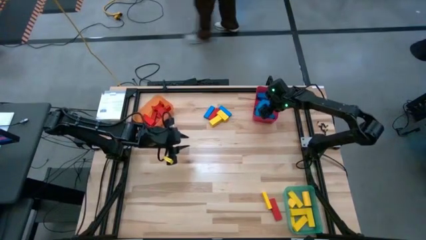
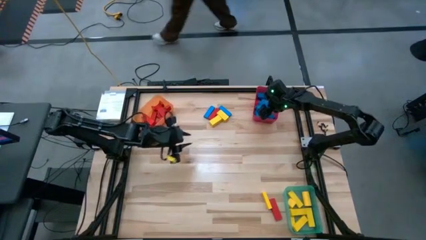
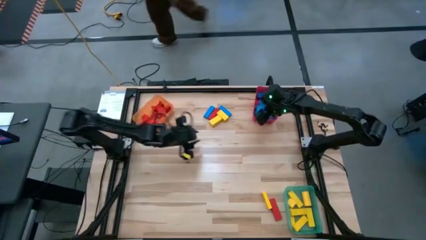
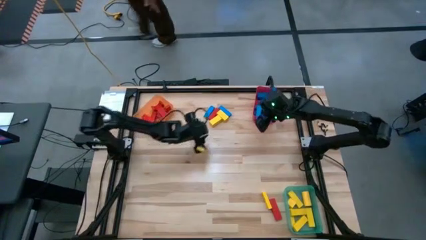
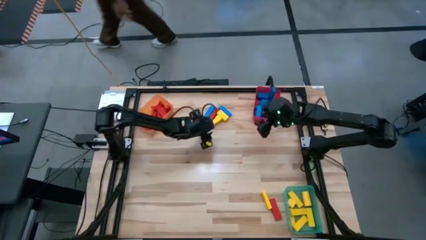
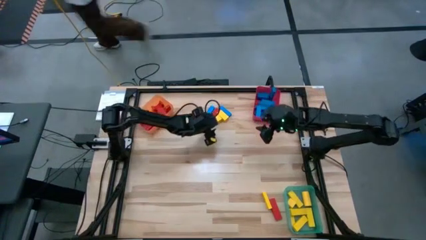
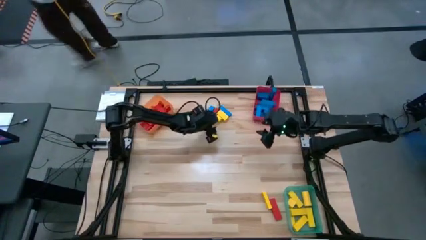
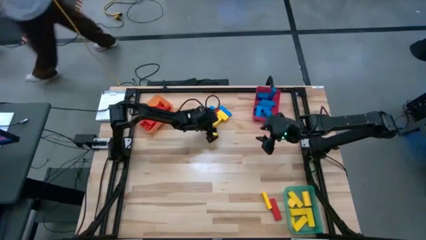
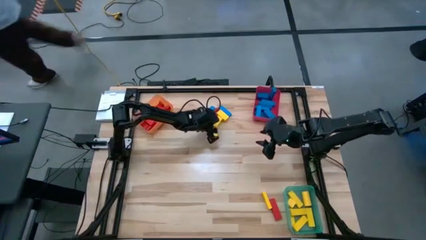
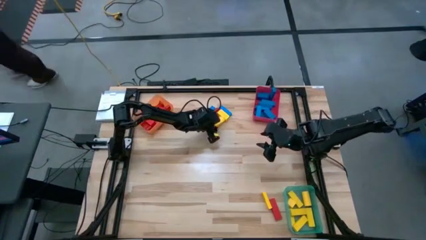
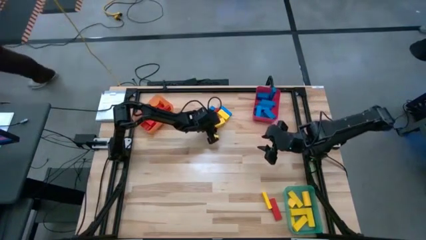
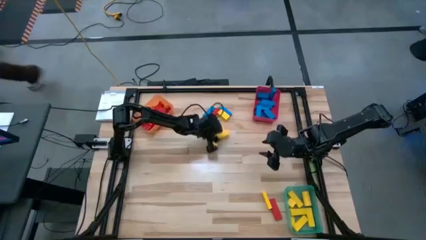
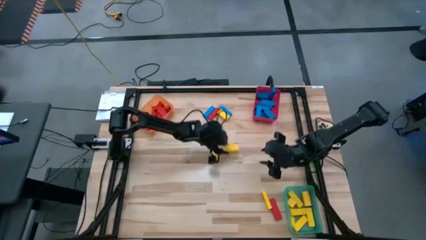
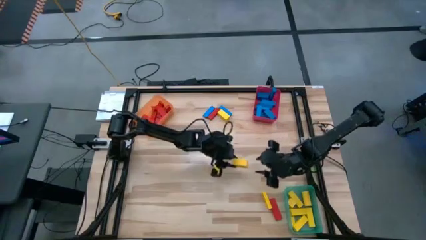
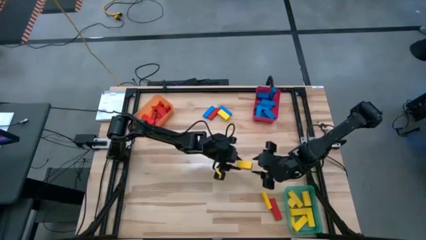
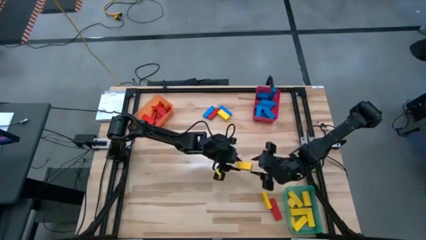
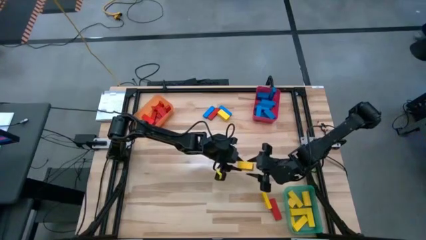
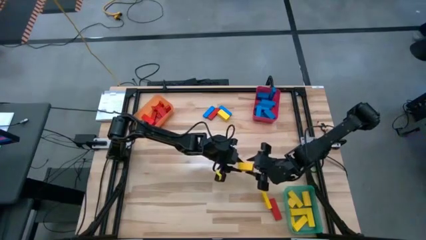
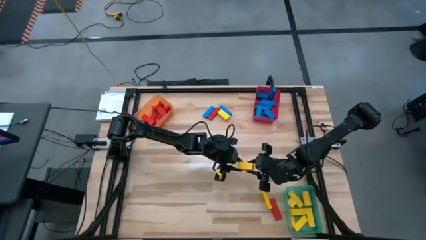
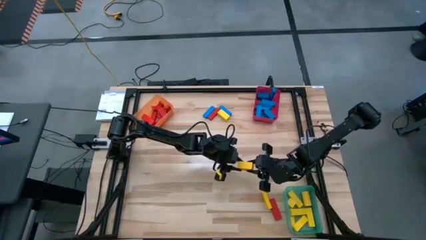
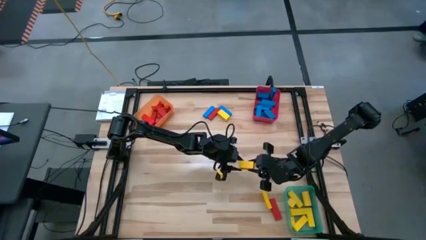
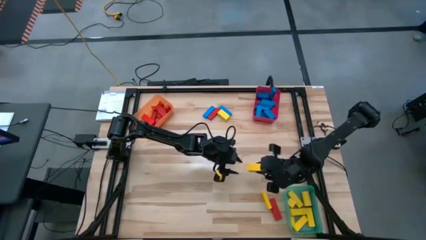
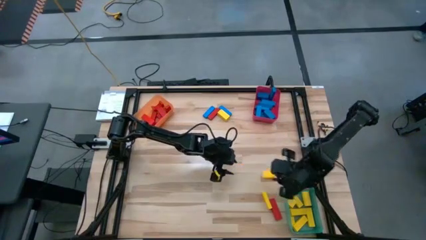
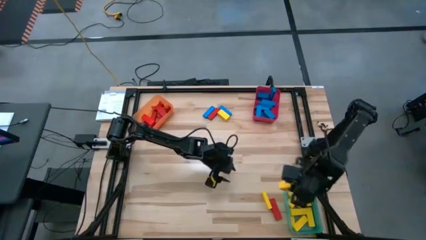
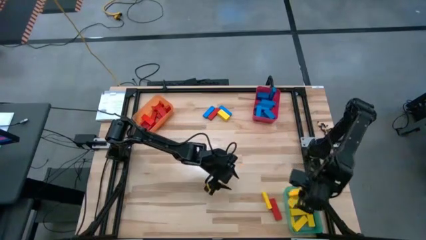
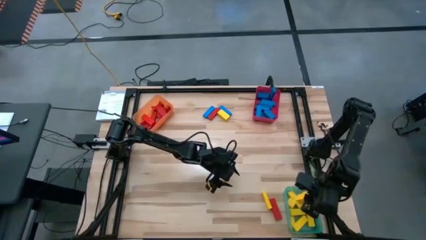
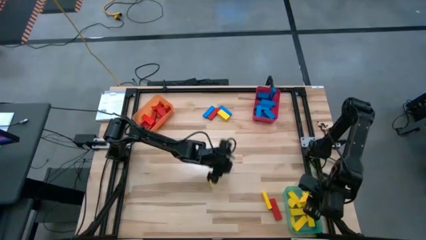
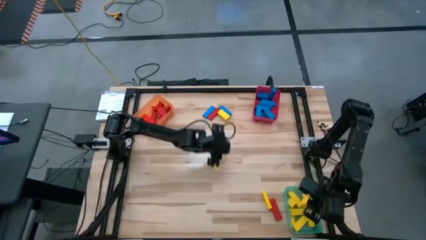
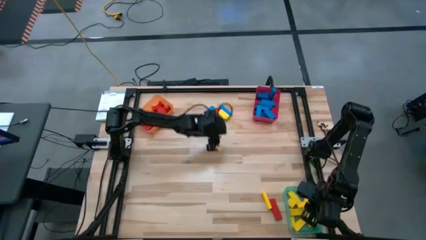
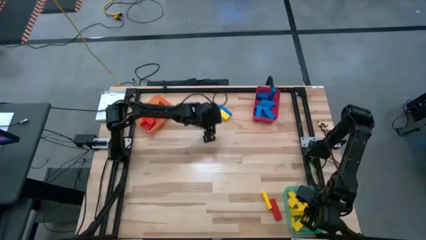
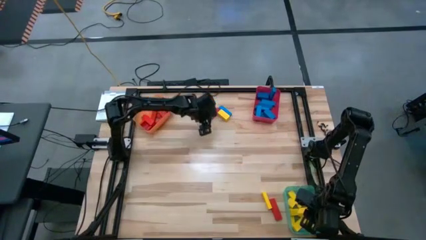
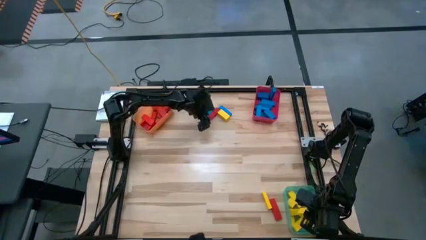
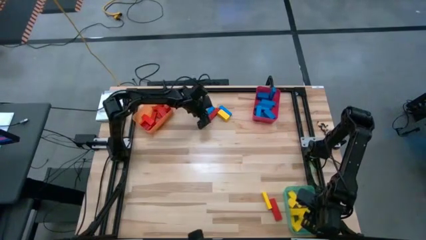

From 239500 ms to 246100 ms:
Task: Sort blocks
Put the yellow block into the green bin

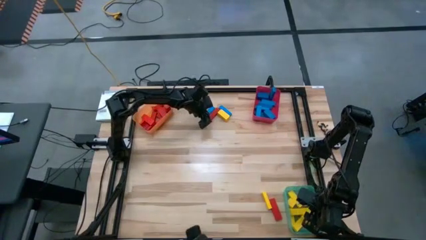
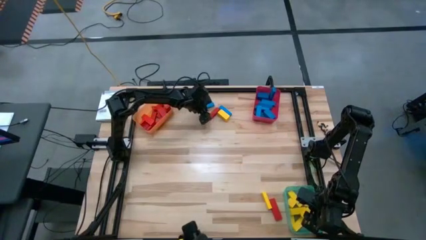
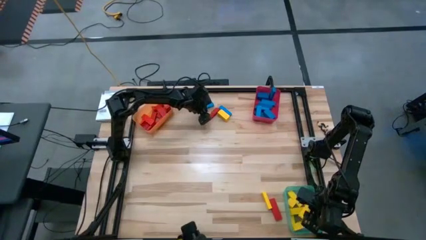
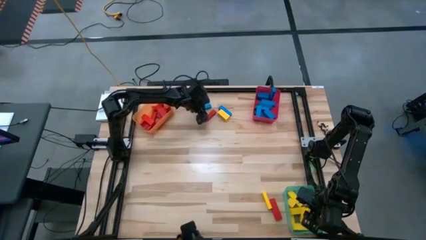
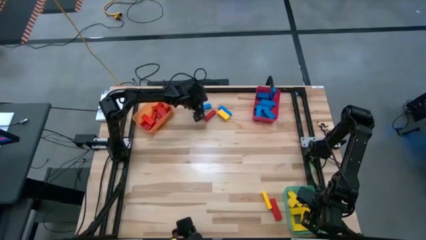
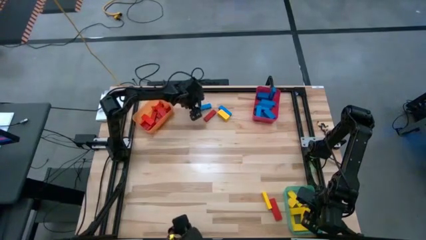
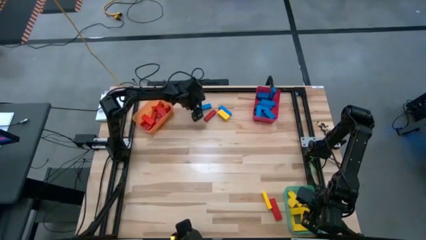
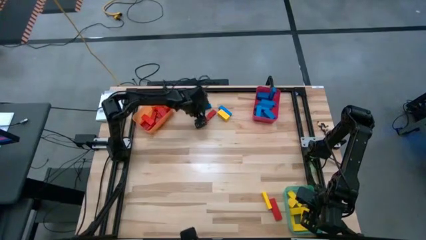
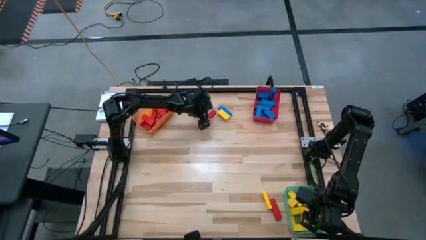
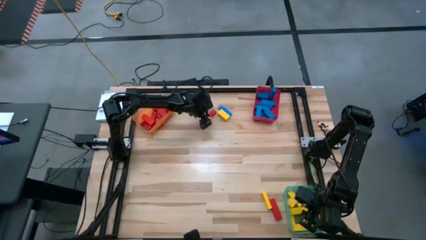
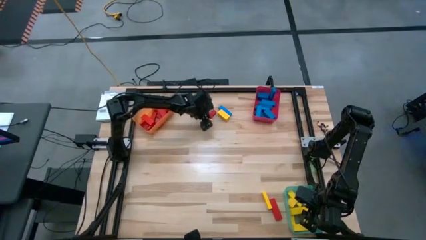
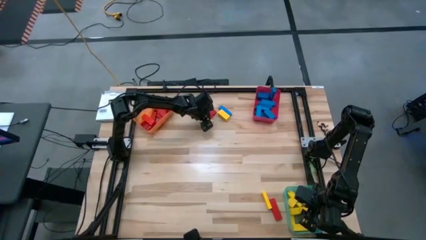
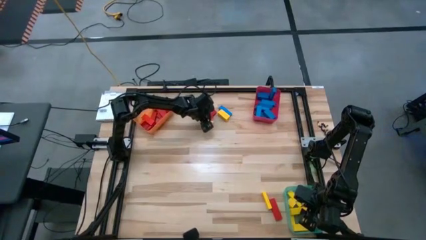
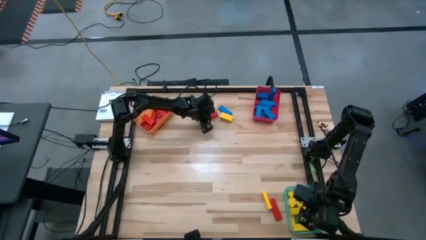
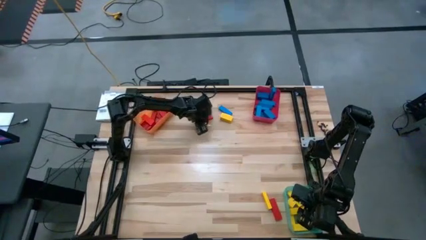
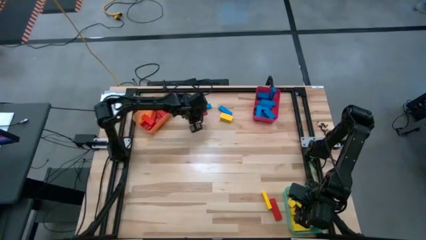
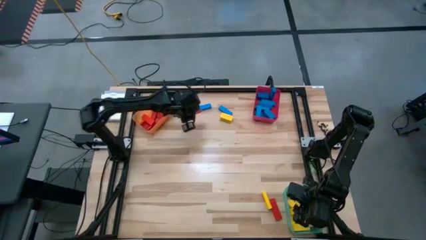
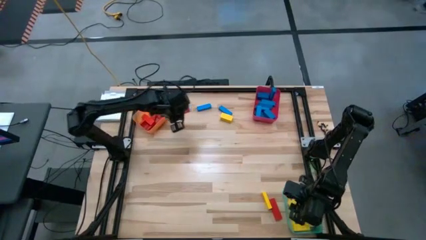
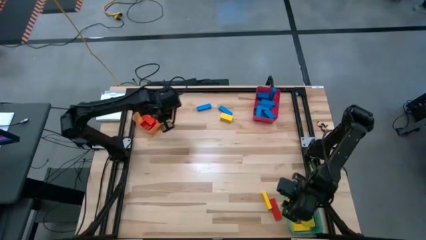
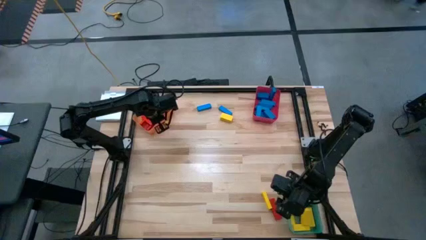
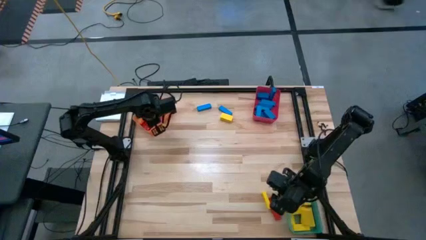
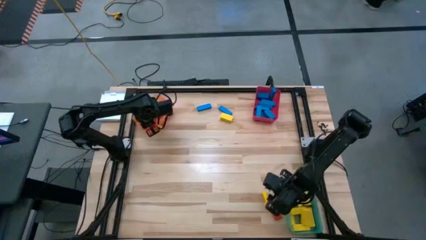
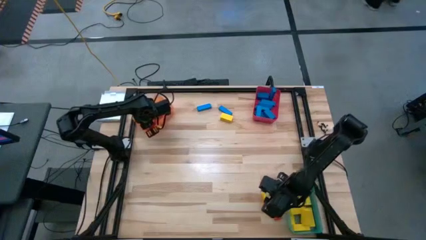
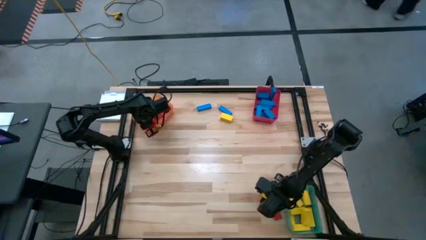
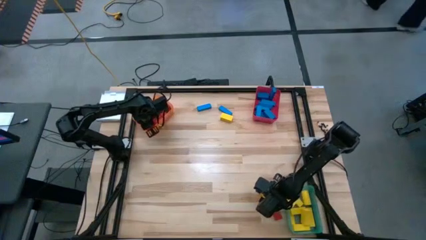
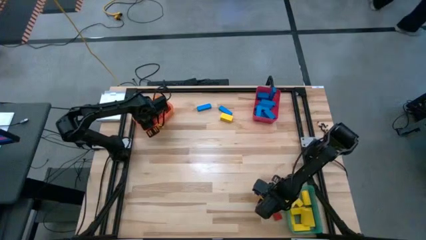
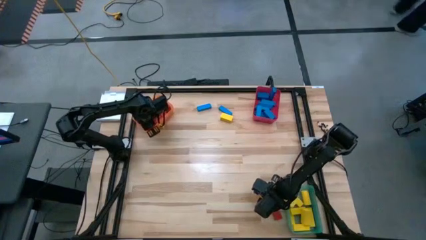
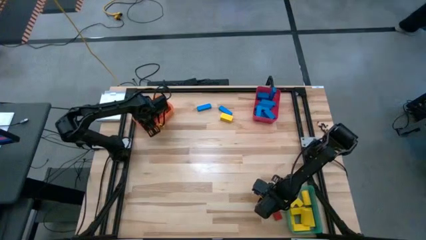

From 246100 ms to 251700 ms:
Put the red block into the orange bin

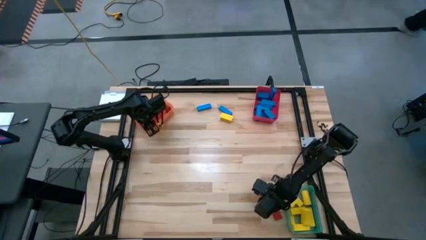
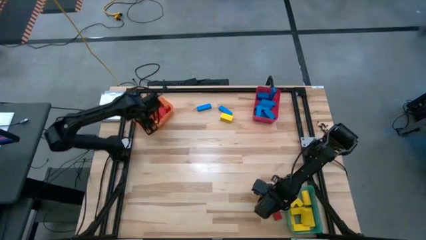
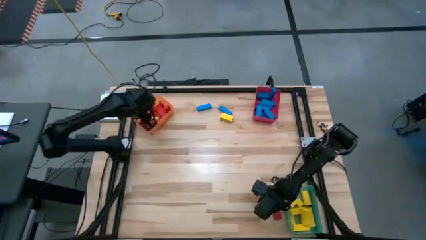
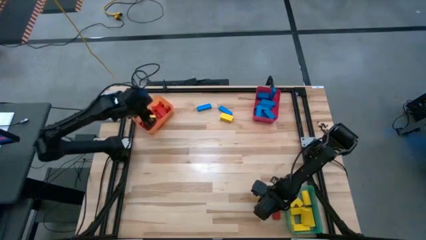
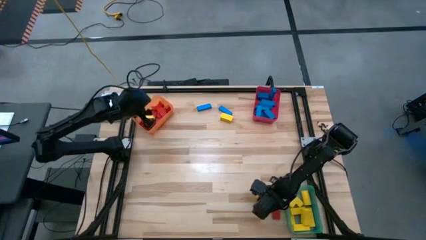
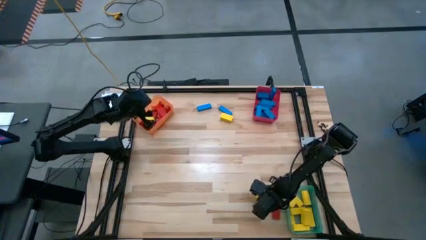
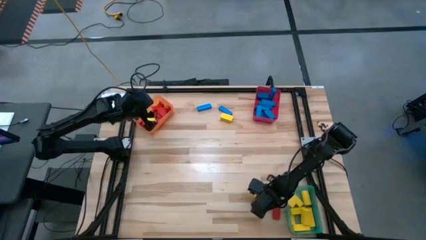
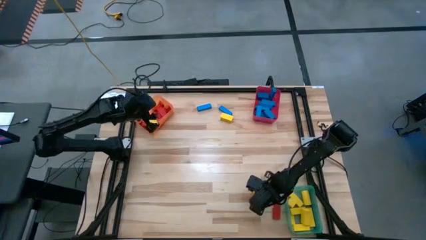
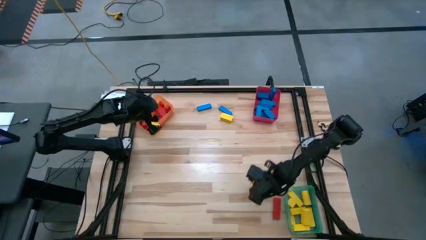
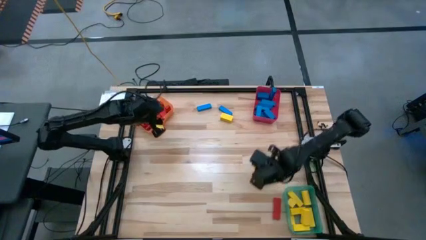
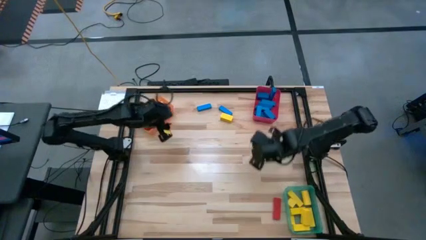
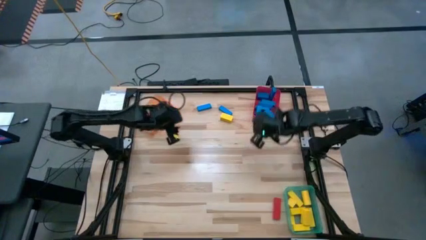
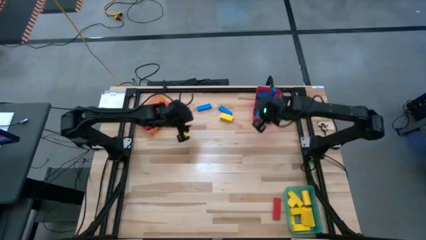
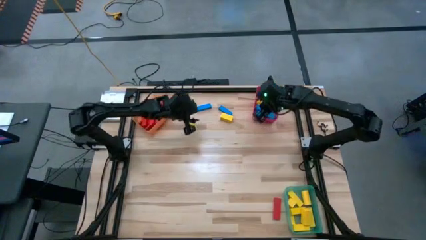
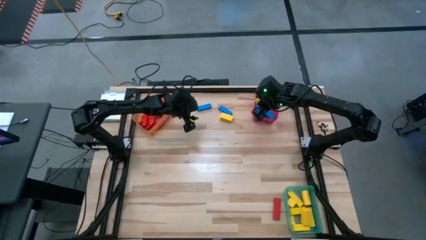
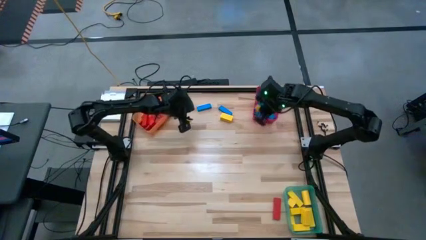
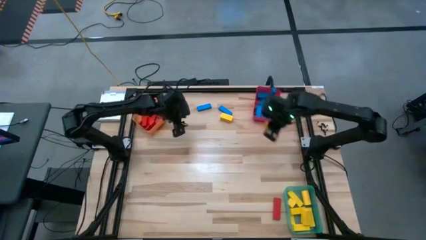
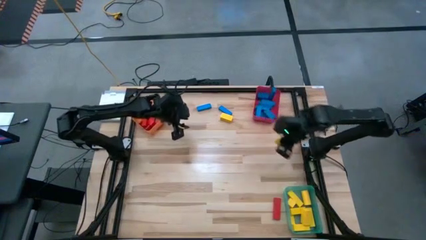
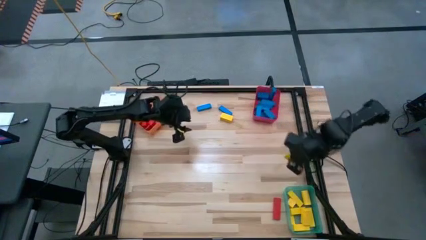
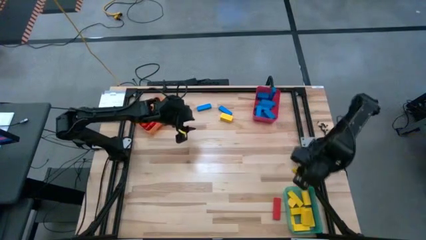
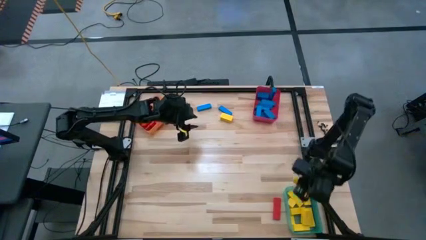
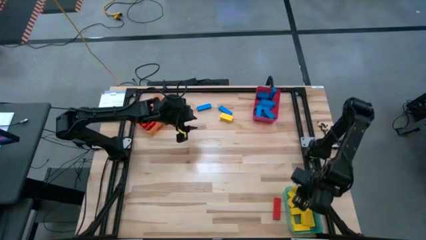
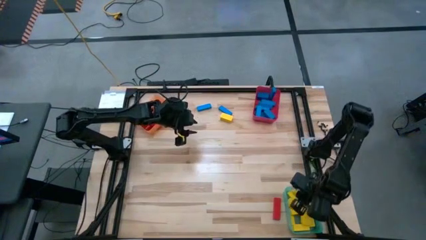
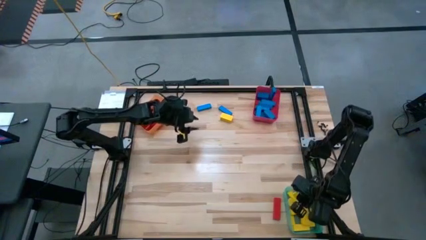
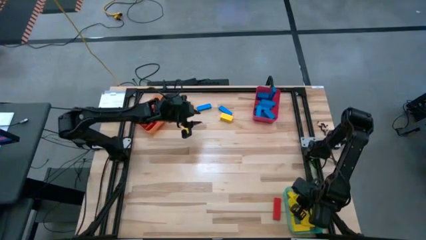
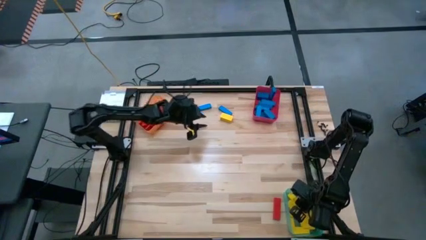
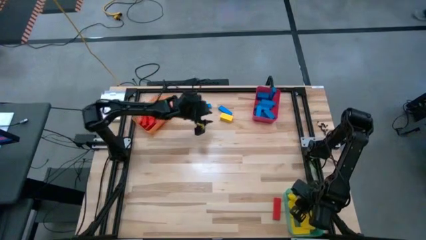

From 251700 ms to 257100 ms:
Put the yellow block into the green bin
